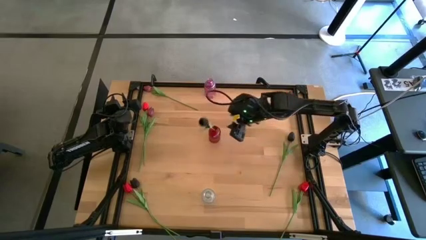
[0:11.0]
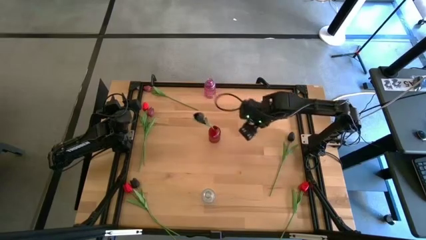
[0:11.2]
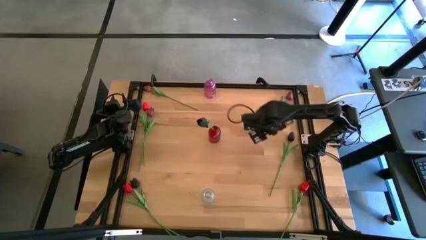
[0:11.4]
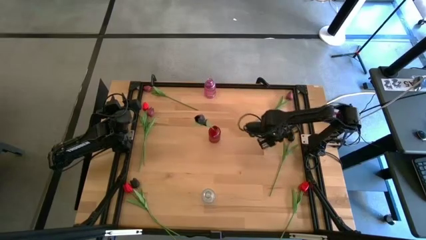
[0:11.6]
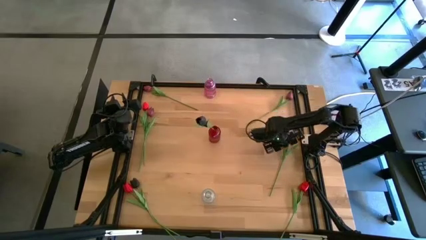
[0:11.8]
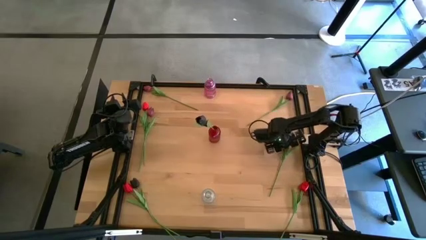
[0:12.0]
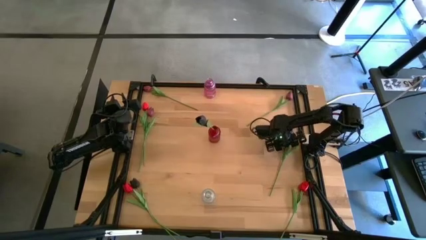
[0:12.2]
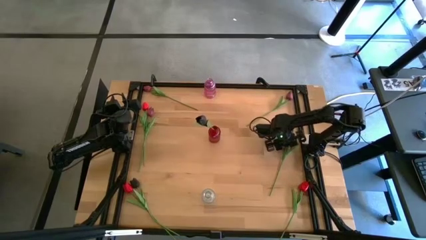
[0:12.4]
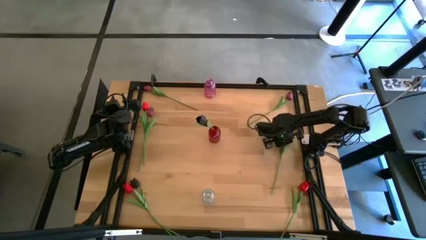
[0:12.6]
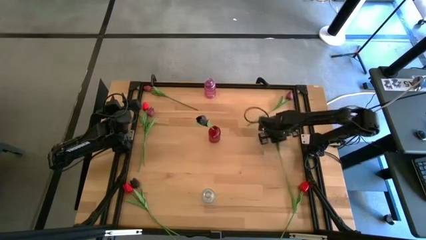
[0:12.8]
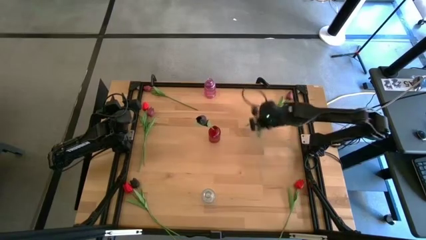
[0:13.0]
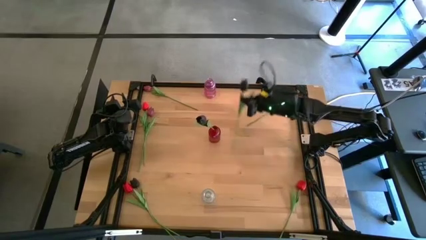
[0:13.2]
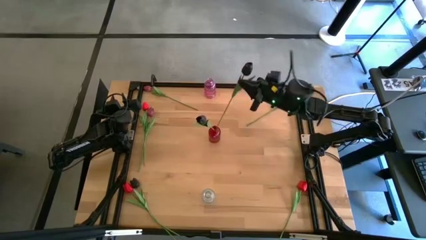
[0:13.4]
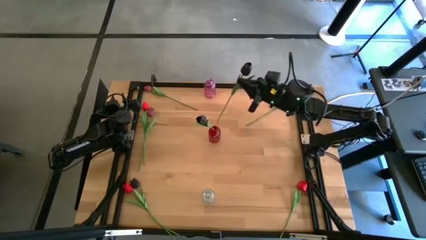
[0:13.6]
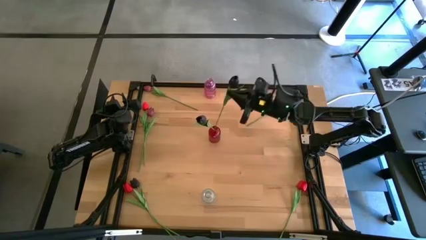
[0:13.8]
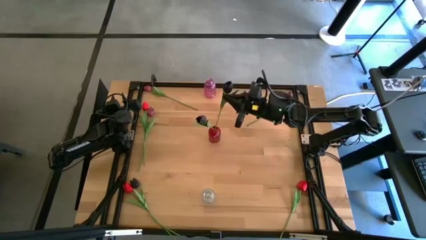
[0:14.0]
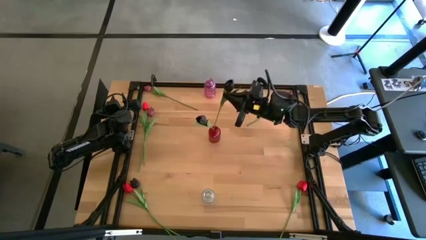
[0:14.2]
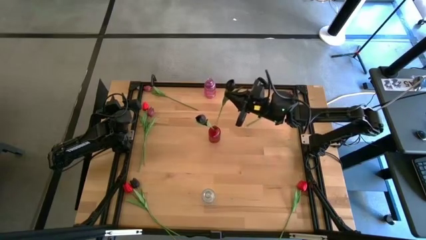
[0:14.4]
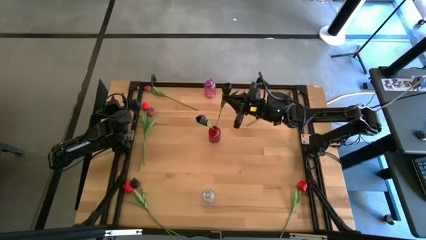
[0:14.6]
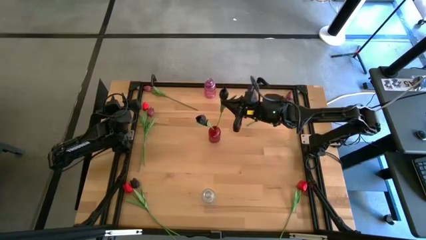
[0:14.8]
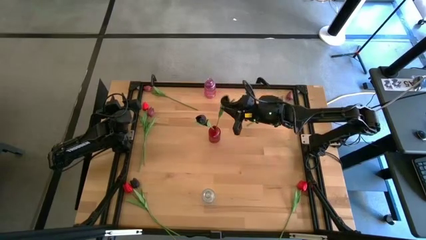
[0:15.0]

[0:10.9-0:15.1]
Task: Sort flowers into vase by color
Put the top black tulip into the red vase

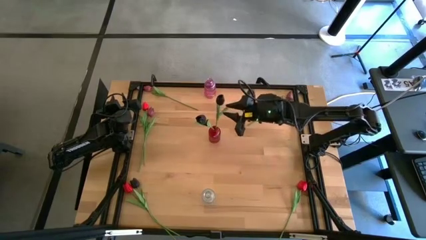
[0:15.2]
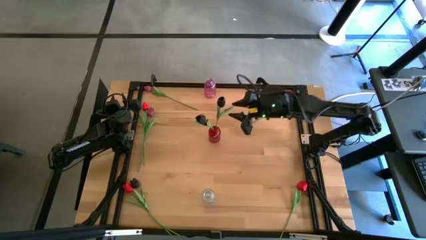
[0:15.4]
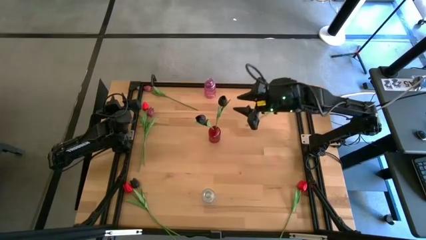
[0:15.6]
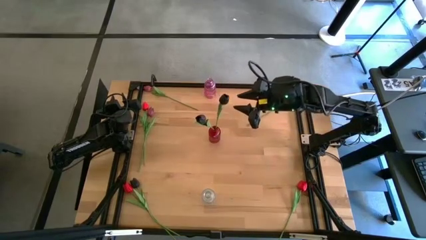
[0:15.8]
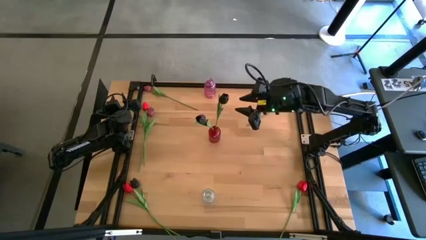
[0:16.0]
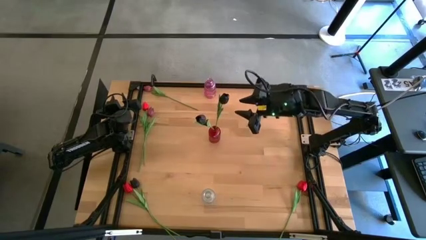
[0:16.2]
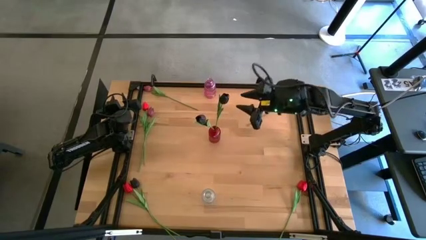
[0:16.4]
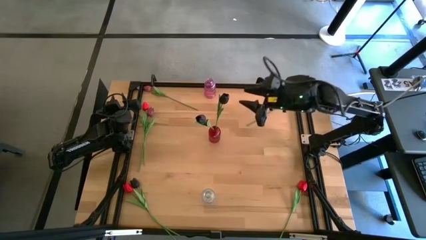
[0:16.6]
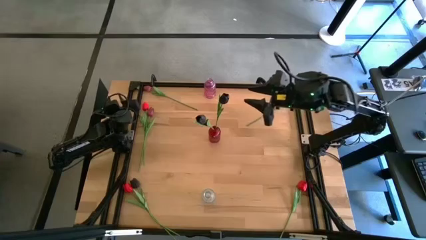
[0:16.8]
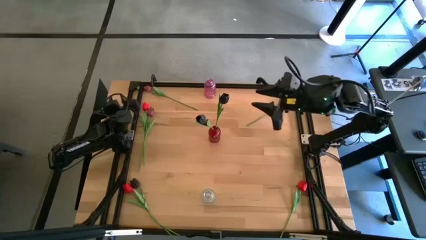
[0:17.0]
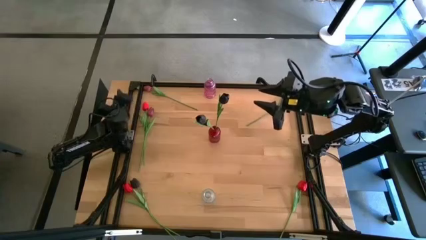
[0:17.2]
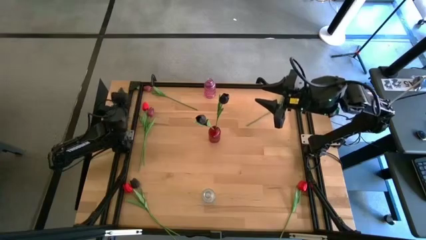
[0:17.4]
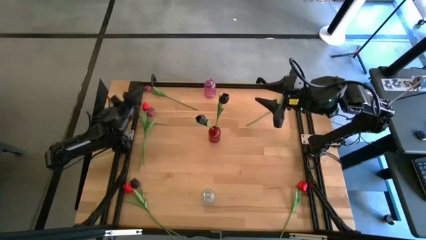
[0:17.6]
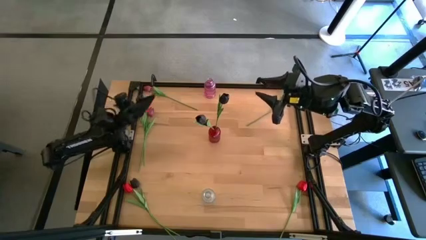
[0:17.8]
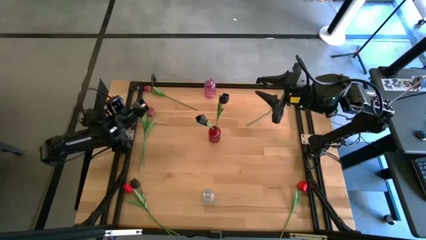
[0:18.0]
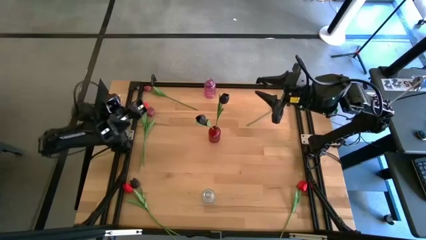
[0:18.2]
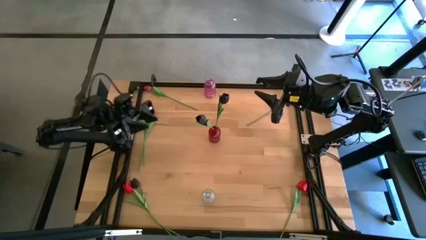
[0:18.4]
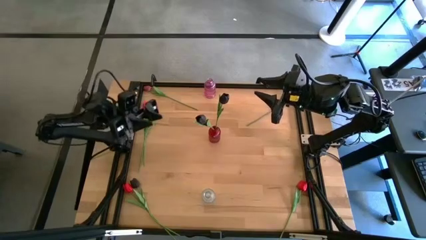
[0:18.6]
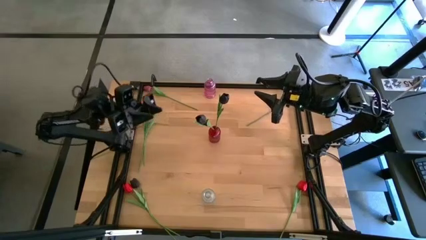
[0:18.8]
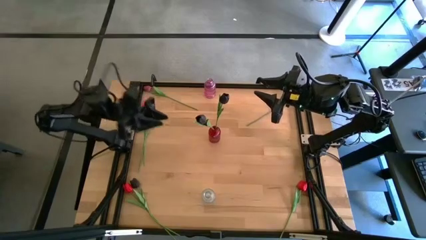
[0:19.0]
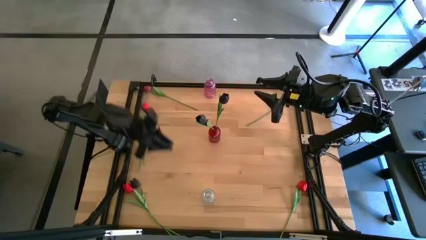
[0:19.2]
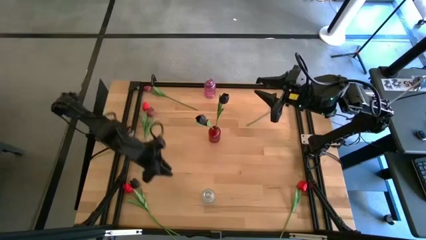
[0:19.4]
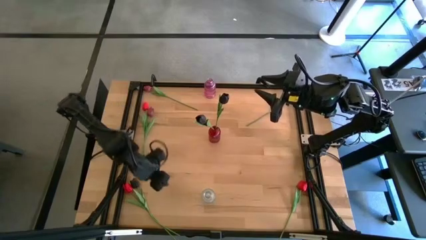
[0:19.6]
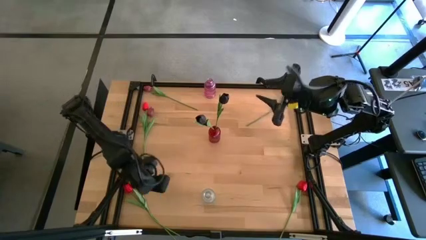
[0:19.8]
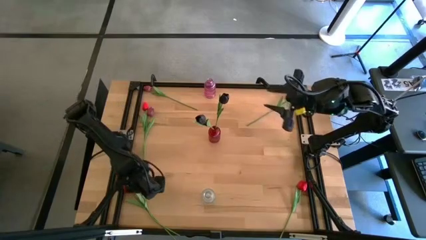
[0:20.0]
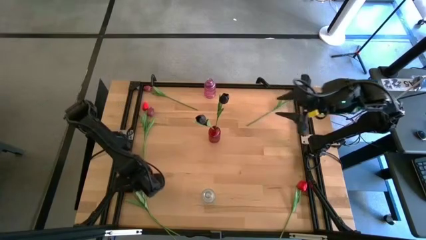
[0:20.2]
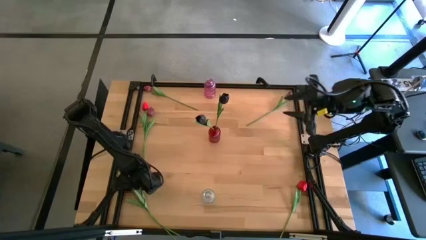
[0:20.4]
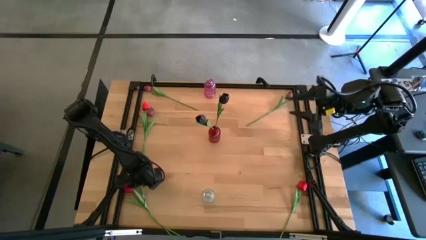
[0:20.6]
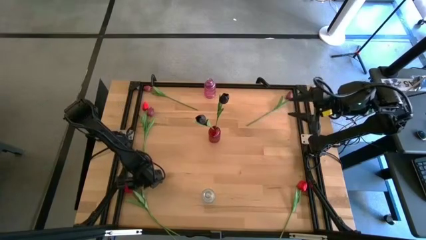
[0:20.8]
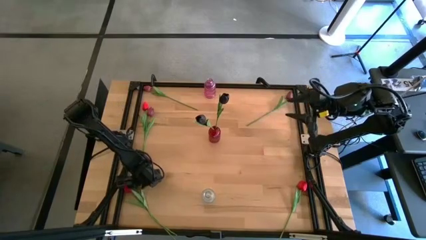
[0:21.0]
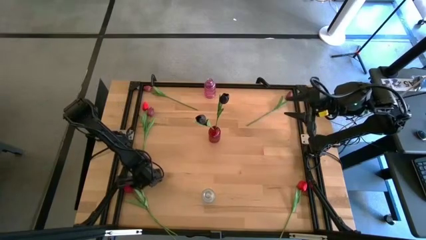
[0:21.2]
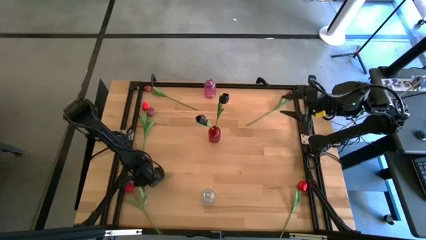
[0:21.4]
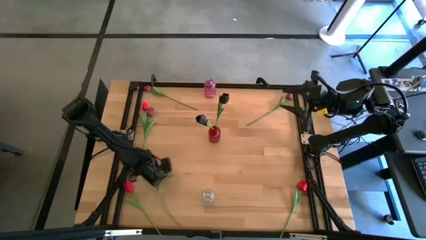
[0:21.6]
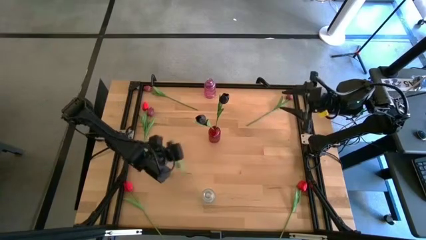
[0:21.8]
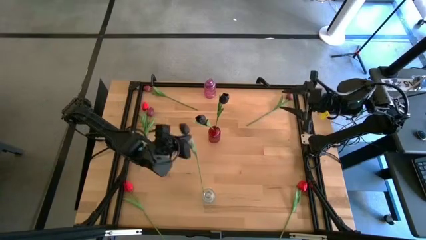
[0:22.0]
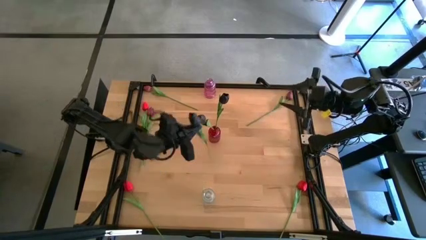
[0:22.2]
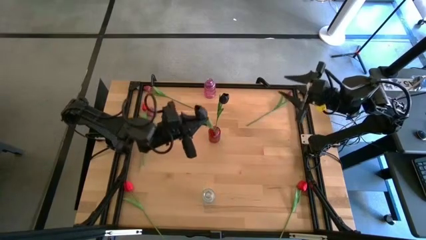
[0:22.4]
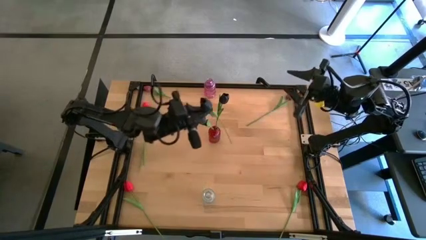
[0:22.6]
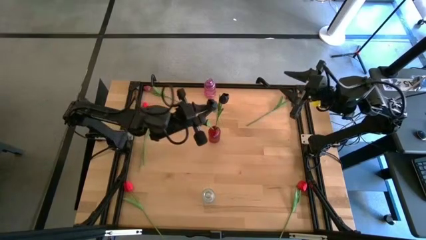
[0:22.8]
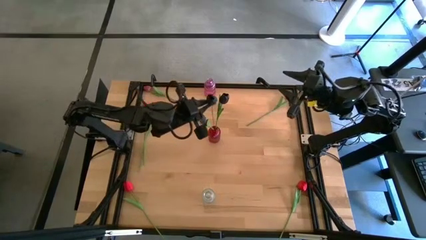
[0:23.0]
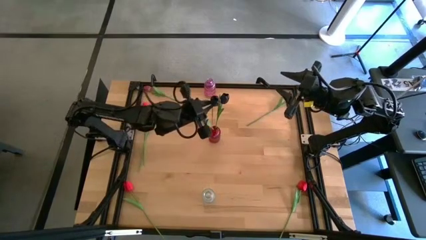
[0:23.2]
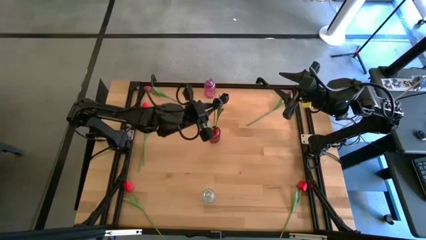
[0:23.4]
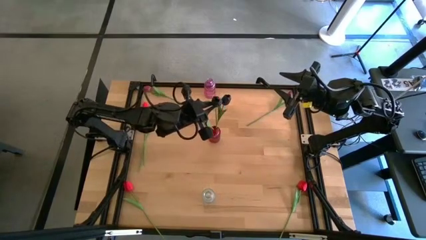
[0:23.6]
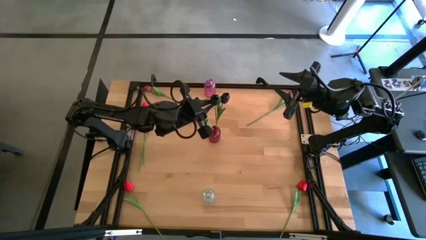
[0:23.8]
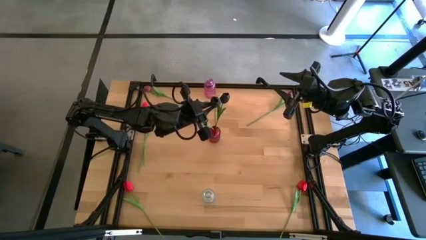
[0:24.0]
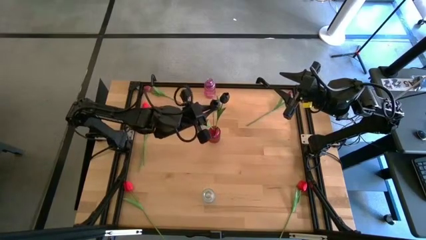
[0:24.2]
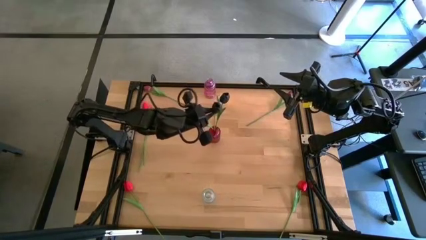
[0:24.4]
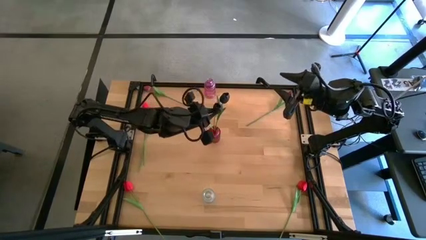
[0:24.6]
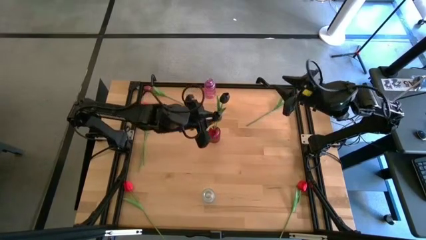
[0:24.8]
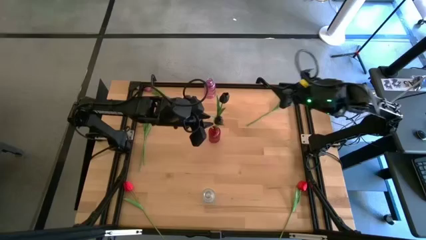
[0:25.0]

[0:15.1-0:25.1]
Put the black tulip into the red vase

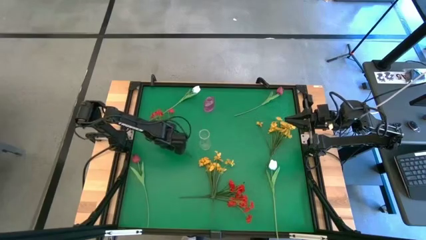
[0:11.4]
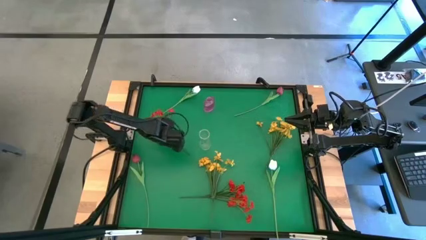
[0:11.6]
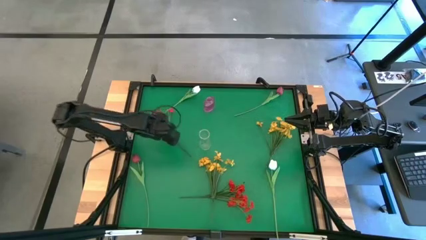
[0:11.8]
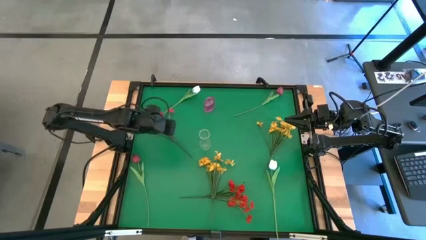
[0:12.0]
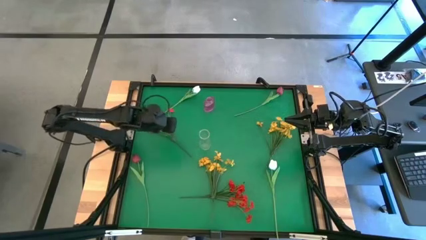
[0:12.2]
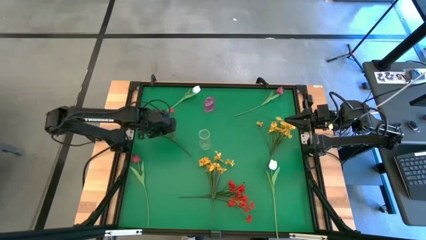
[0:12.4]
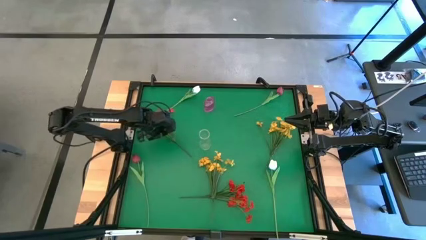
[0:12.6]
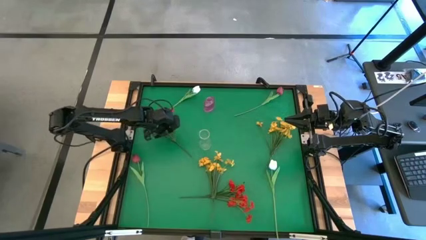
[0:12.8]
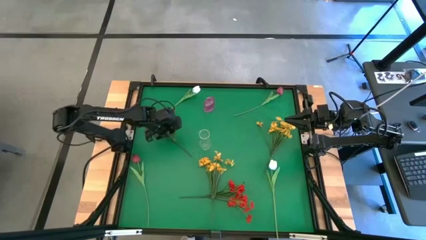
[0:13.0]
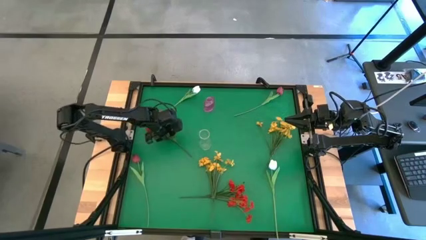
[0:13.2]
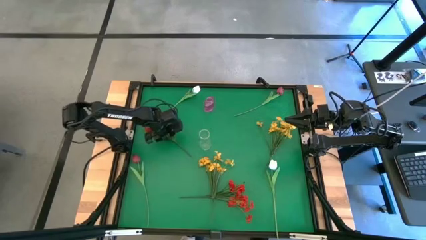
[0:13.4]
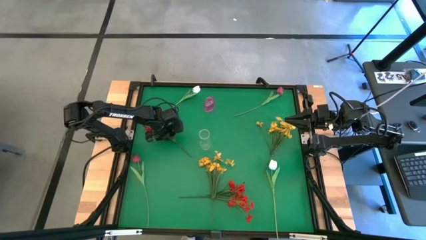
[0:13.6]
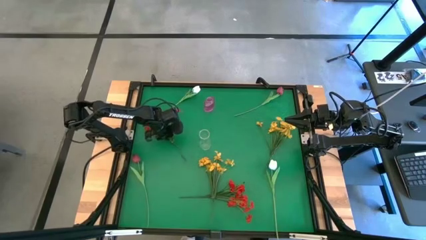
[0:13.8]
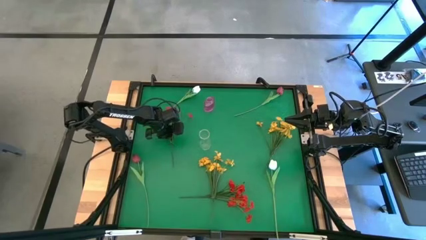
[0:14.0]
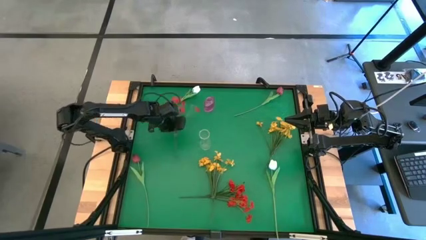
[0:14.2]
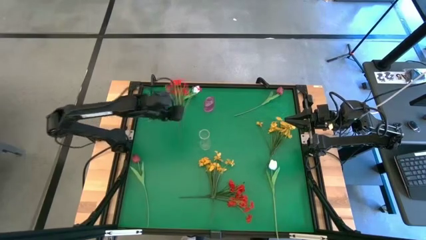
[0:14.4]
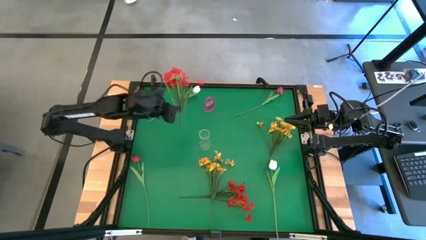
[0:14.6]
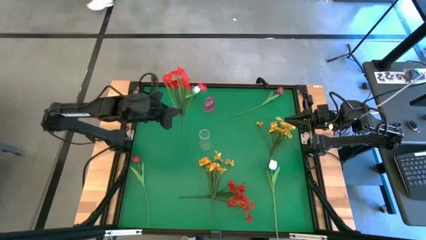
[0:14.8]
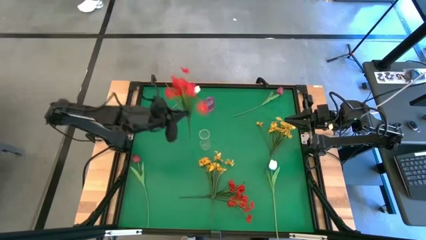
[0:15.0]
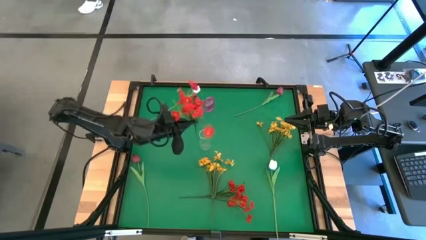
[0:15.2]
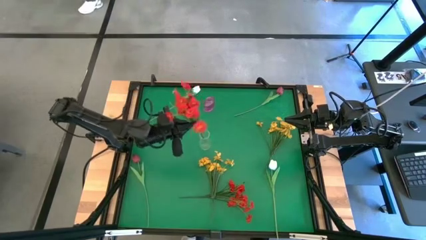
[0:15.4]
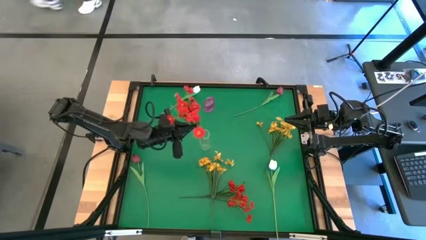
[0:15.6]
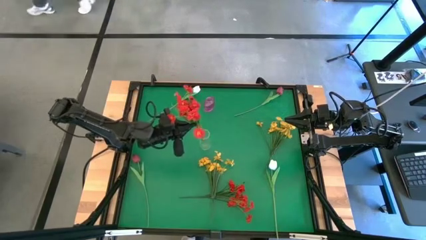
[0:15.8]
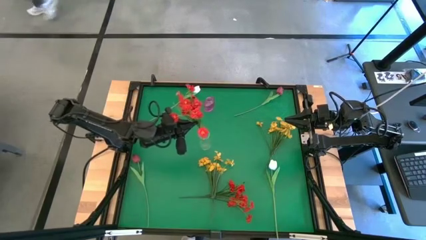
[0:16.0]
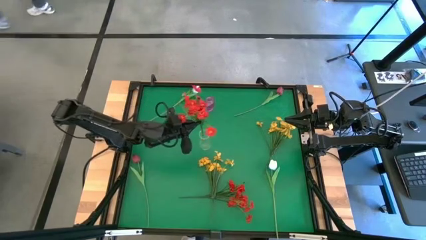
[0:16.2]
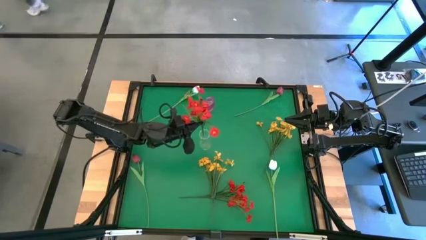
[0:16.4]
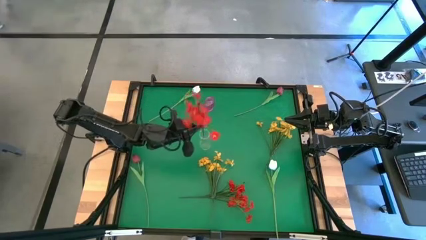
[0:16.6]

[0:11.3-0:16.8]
Task: Sort flowers into vase by color
Put the top red flowers into the transparent vase
